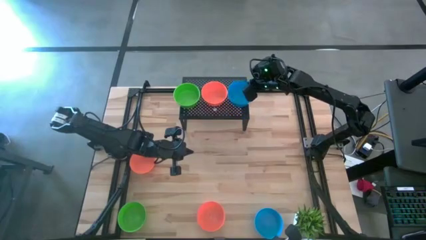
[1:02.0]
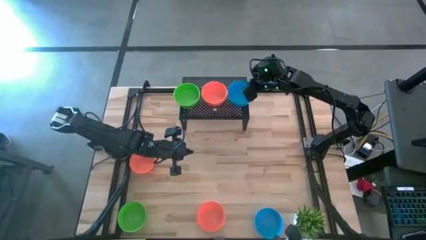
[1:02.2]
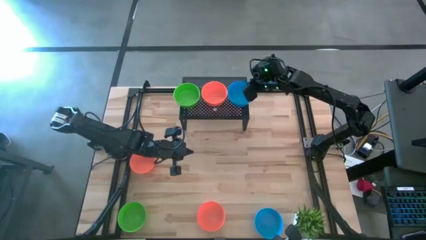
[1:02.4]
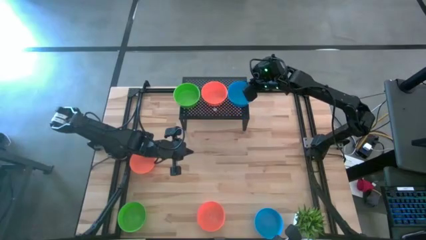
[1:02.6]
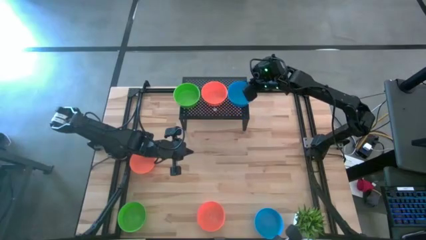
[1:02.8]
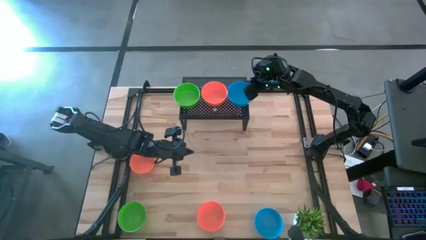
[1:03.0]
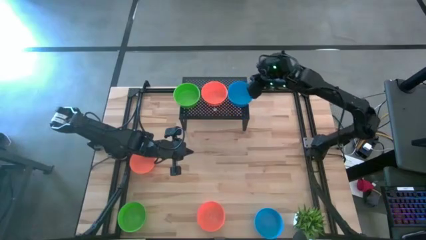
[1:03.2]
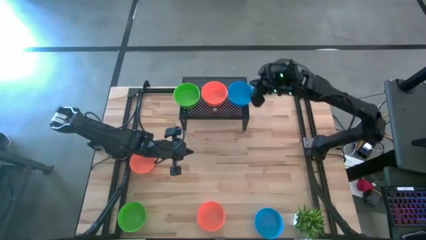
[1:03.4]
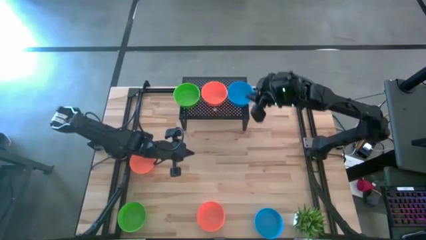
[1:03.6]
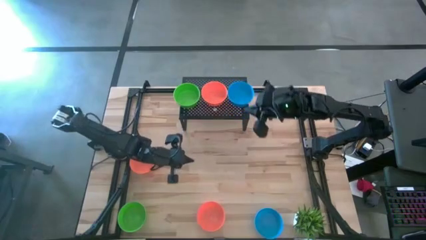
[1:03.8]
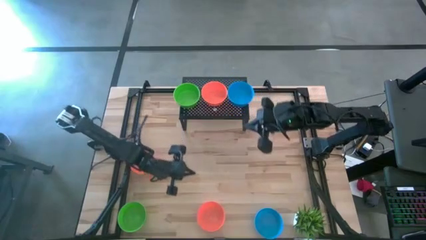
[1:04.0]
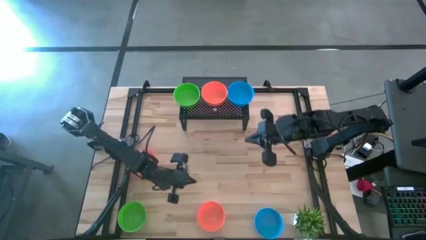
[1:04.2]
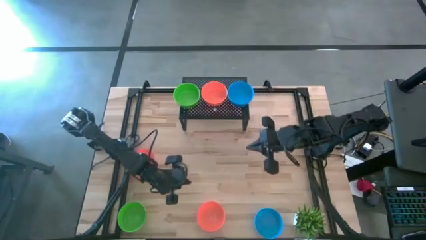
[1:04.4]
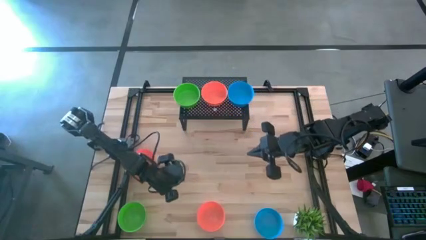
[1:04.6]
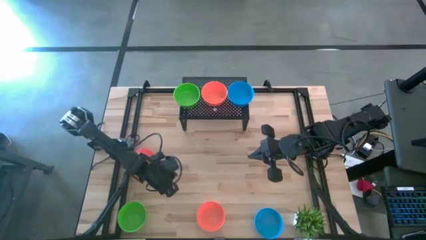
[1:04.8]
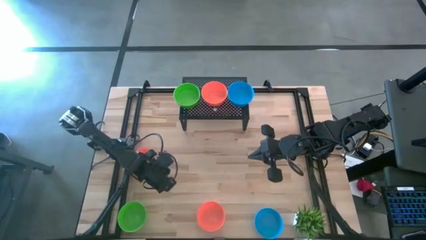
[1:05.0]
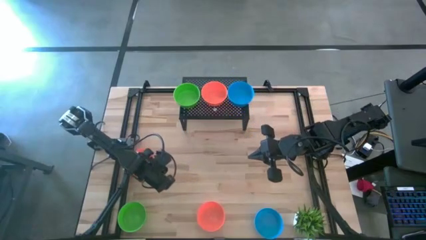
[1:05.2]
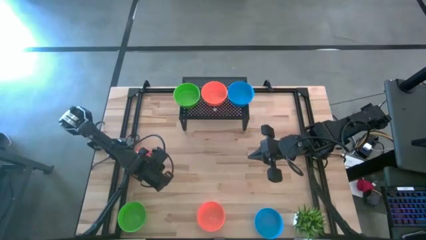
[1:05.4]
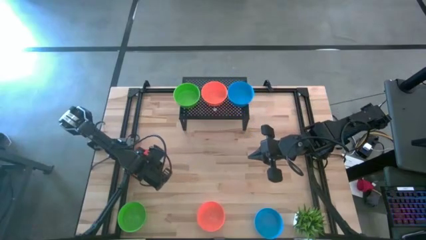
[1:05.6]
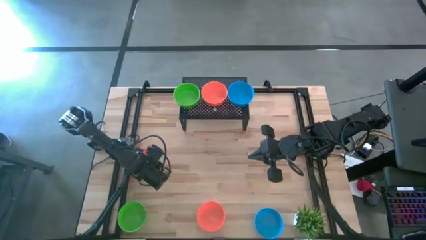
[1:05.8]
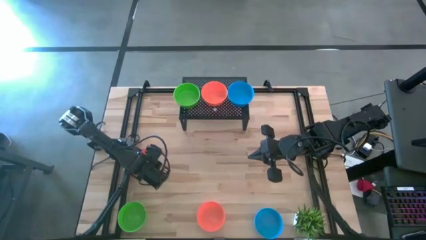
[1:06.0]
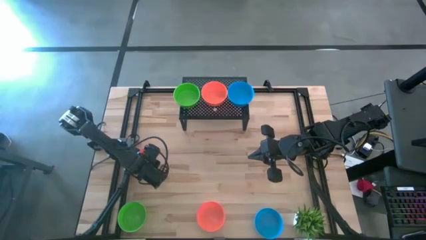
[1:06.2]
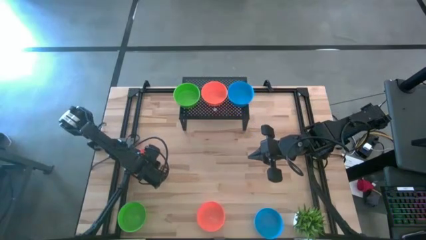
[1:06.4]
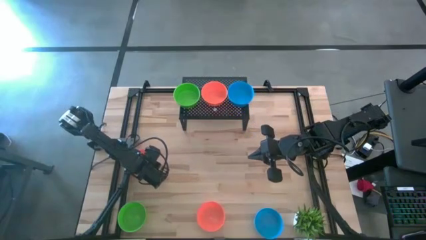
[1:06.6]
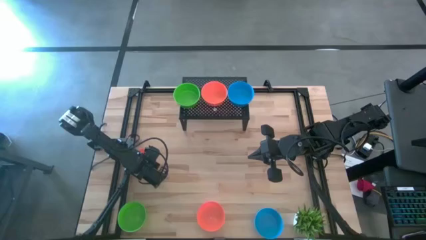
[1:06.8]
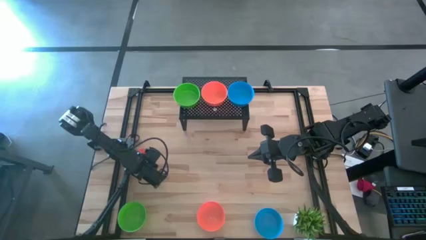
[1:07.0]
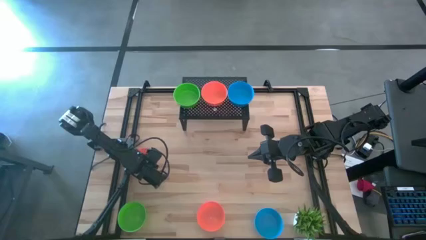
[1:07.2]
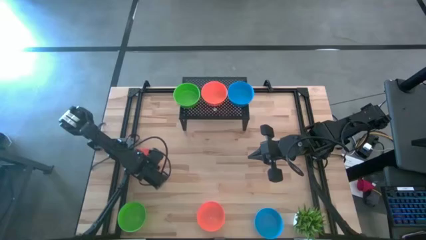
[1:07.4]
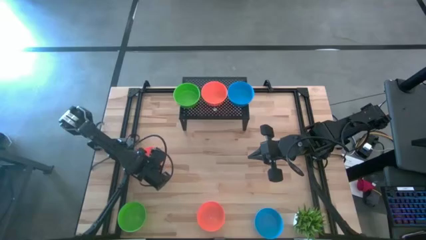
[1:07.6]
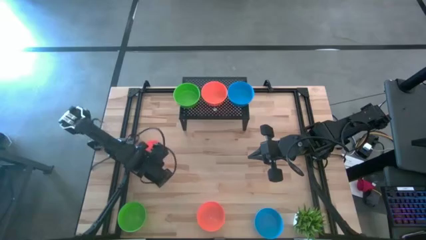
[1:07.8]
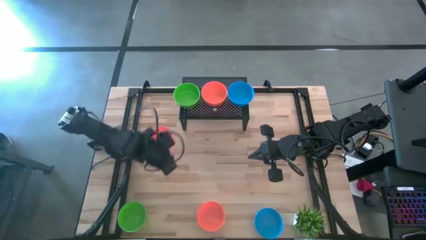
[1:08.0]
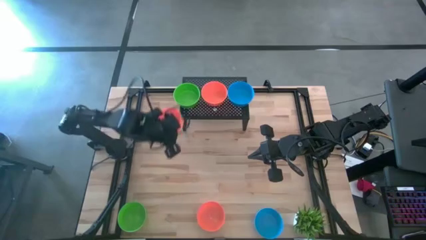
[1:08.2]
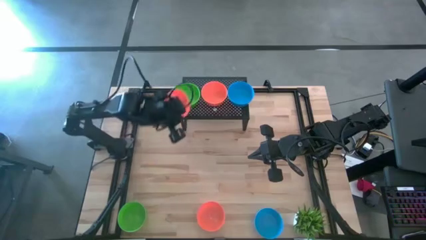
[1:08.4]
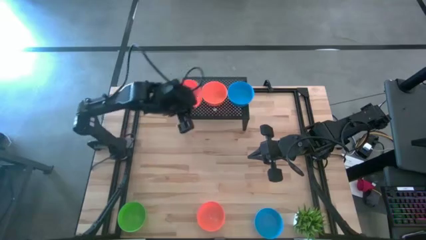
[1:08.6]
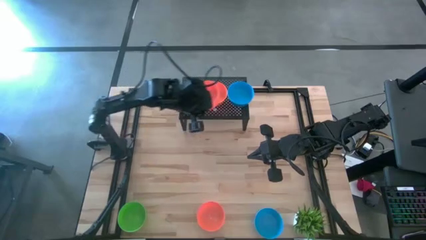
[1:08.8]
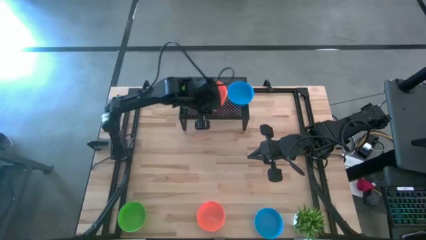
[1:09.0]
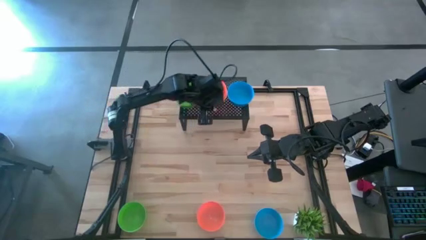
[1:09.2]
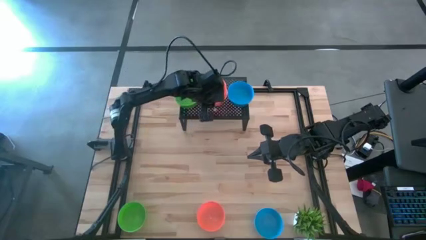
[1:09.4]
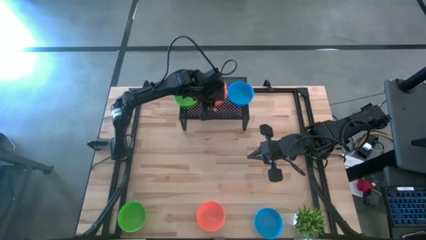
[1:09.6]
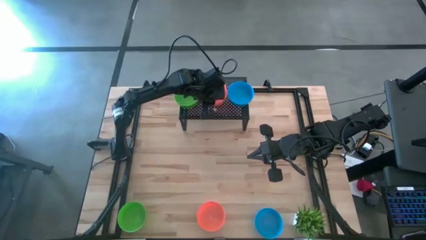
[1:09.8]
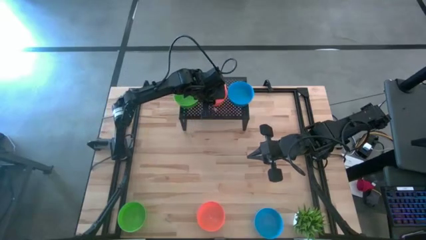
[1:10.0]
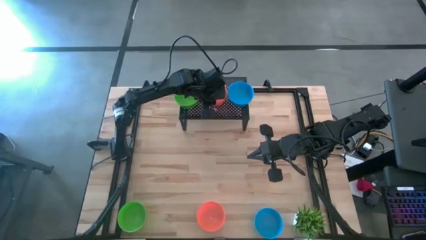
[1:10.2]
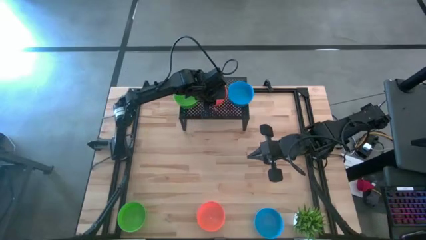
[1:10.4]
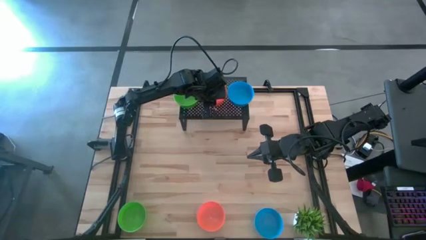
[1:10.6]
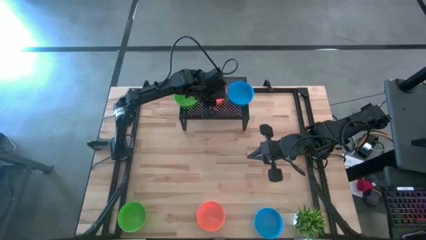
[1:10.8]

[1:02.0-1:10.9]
Task: Pick & Place Mini bowls
Stack the top orange bowl on the orange bowl on the shelf

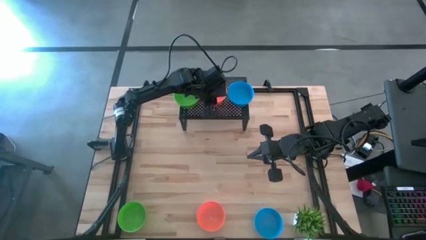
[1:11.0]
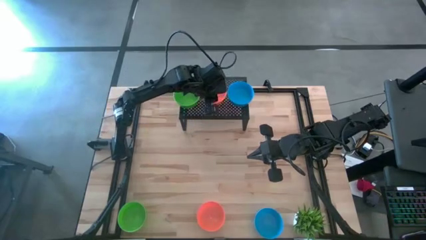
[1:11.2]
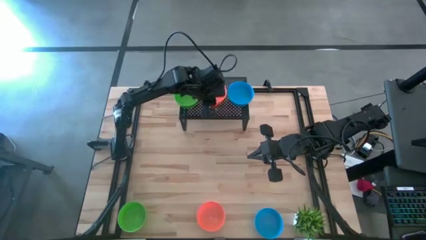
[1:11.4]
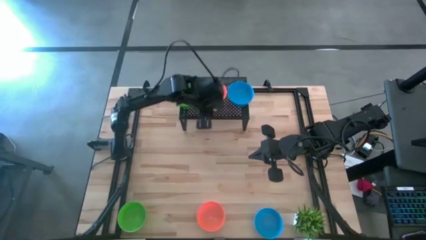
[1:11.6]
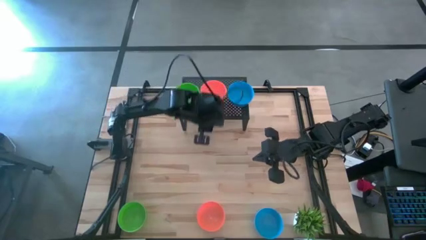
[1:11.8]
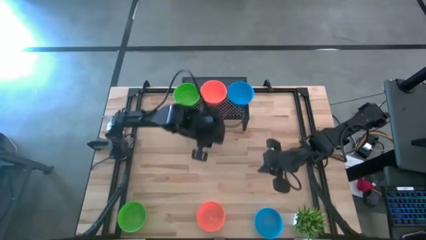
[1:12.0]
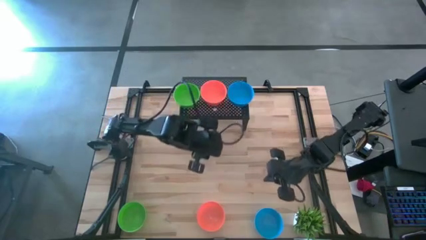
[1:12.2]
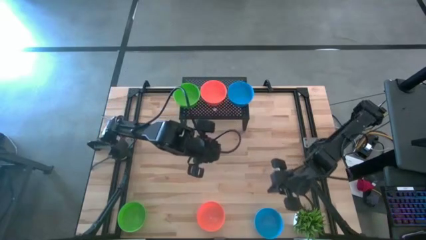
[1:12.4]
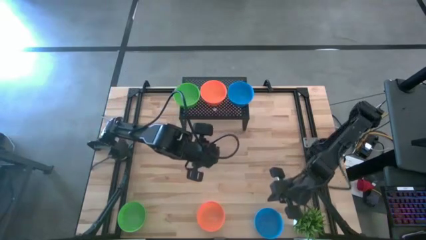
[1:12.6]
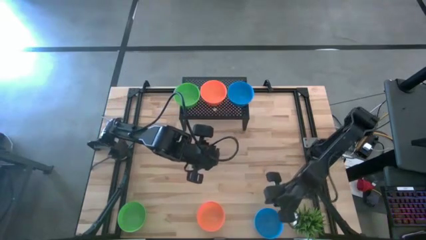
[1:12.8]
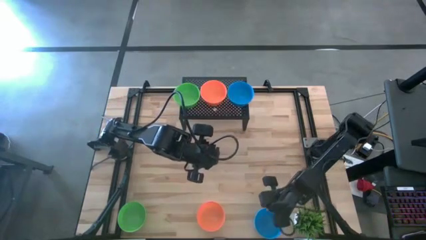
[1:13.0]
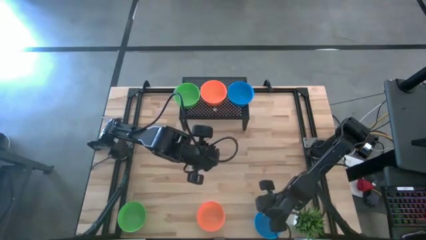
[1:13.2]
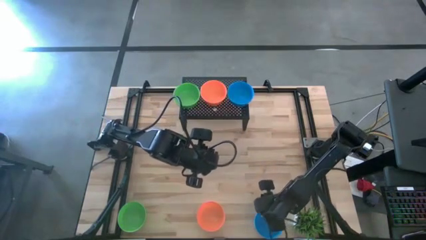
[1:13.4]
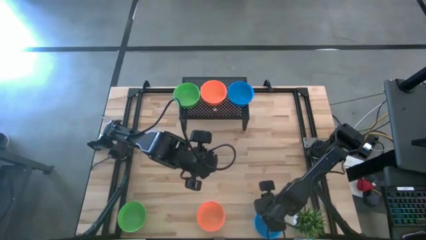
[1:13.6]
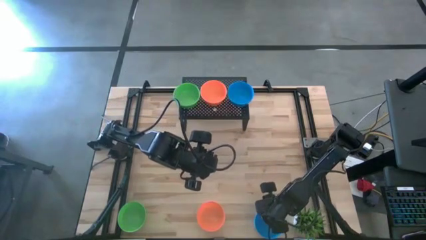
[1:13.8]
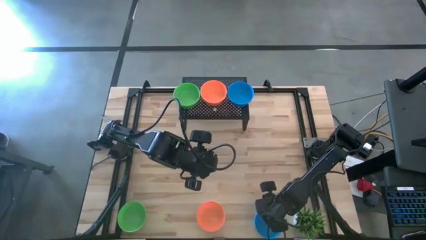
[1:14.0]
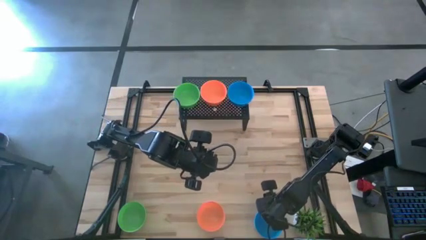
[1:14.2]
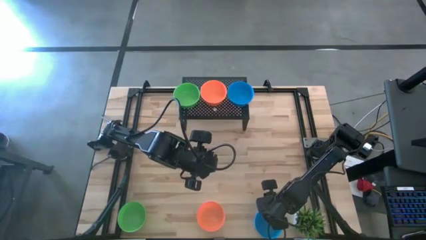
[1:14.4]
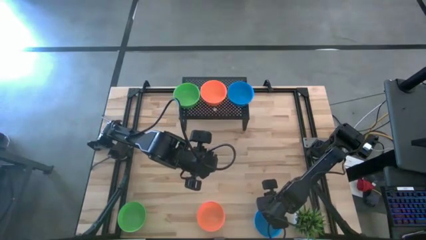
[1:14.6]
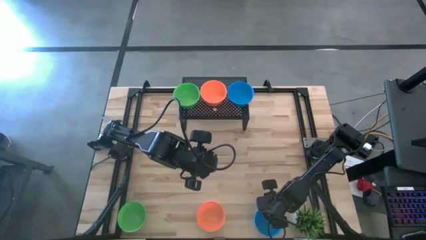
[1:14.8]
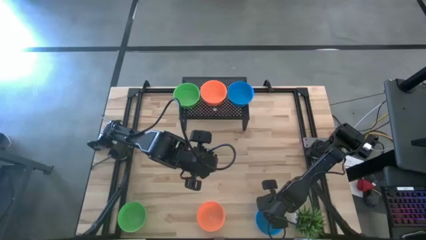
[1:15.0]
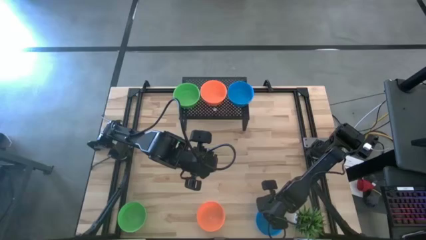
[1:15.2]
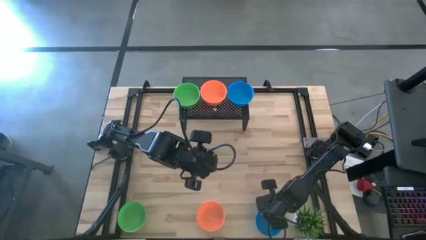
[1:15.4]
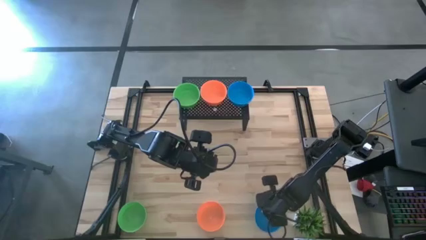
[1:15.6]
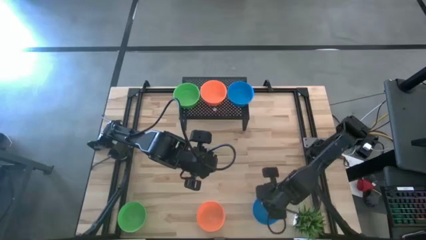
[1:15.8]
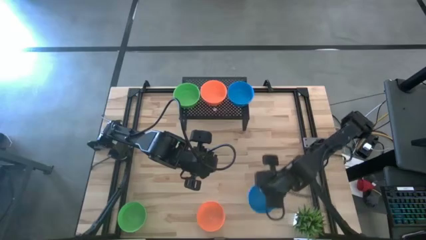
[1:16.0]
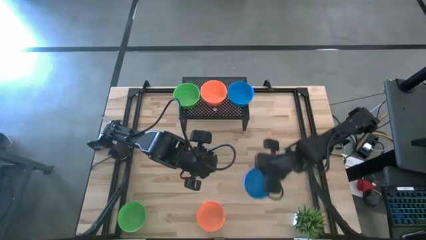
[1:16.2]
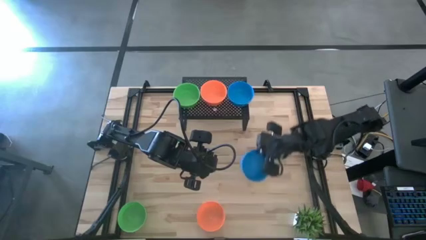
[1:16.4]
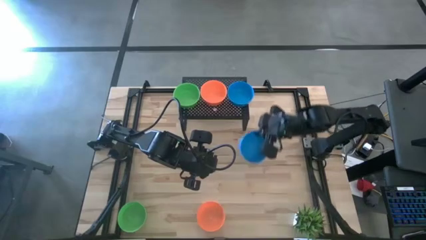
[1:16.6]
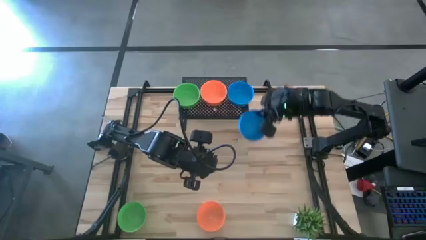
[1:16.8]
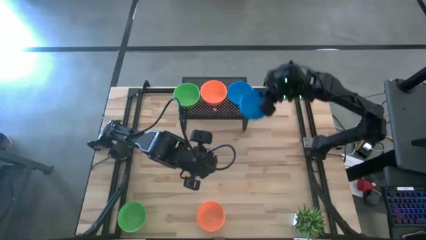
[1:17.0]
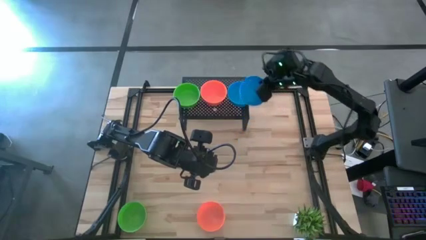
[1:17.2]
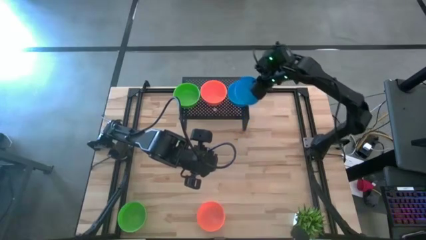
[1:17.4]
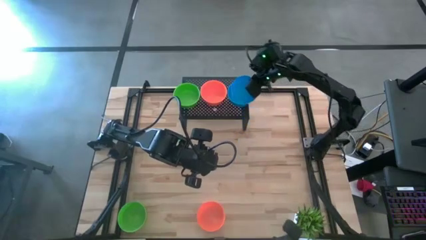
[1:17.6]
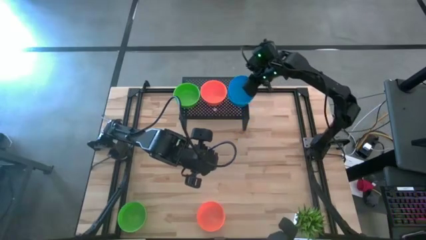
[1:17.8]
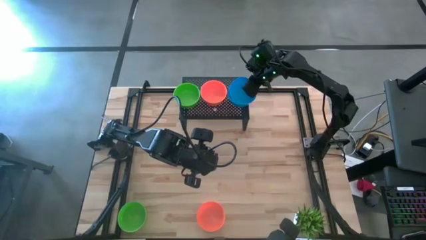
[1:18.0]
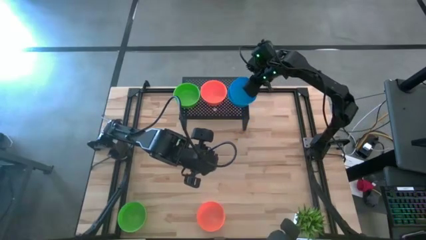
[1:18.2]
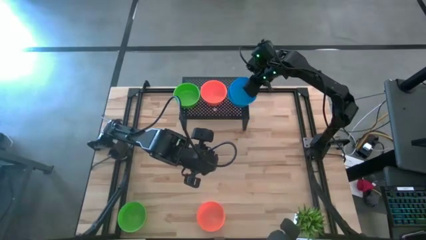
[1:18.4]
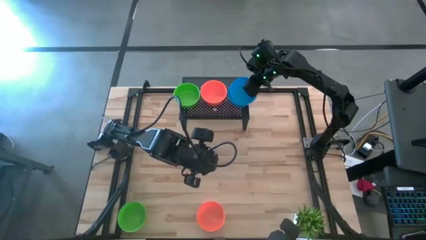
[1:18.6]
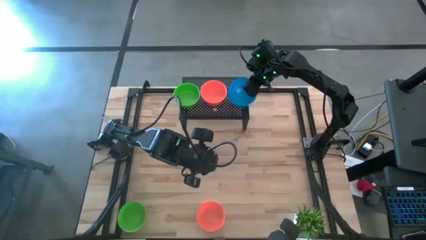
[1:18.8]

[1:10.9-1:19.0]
Stack the blue bowl on the blue bowls on the shelf
